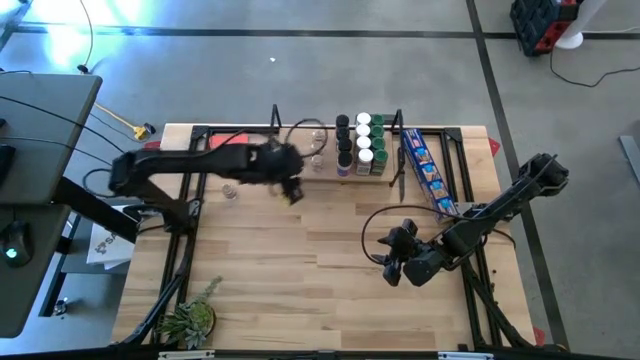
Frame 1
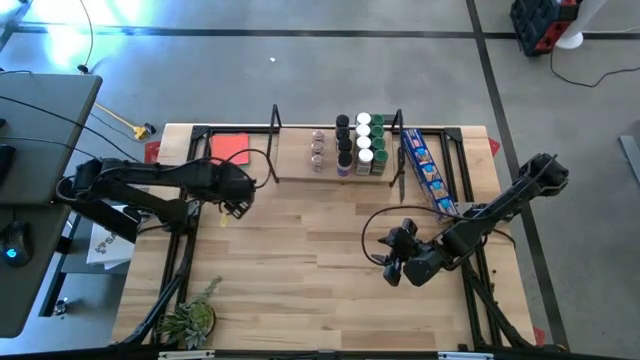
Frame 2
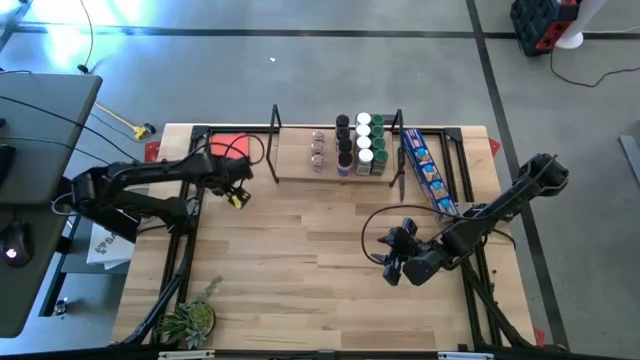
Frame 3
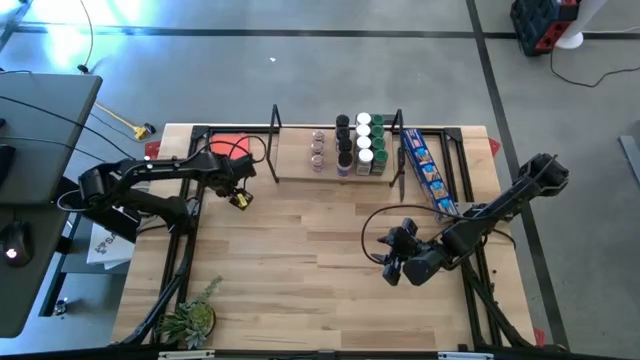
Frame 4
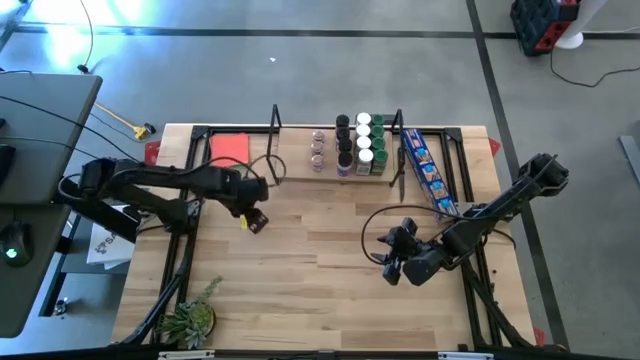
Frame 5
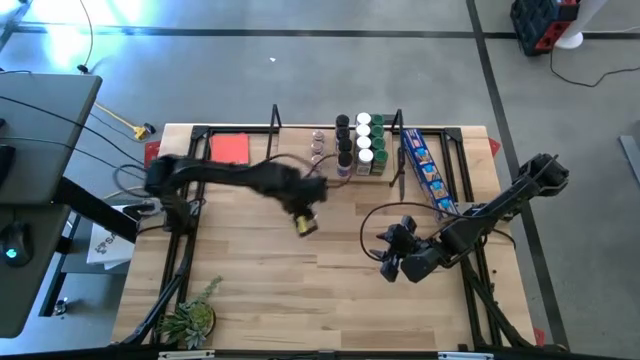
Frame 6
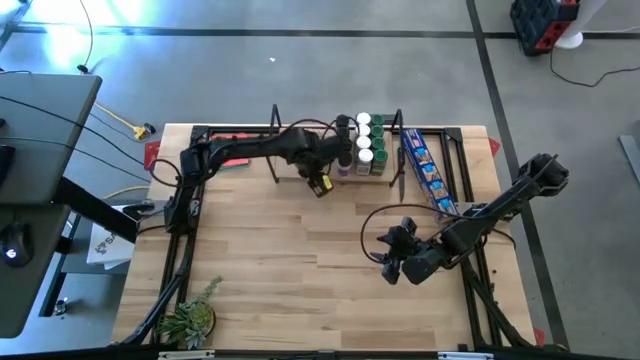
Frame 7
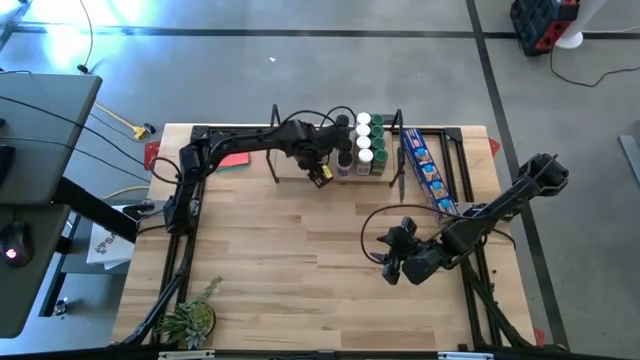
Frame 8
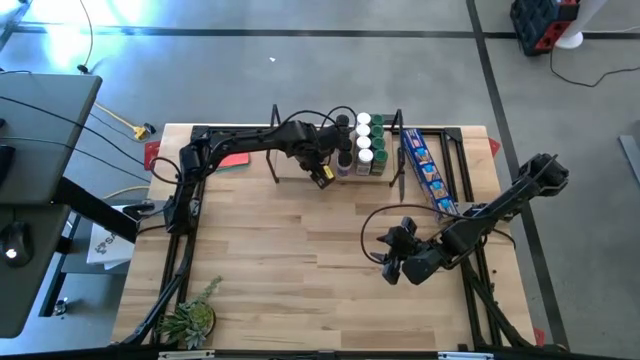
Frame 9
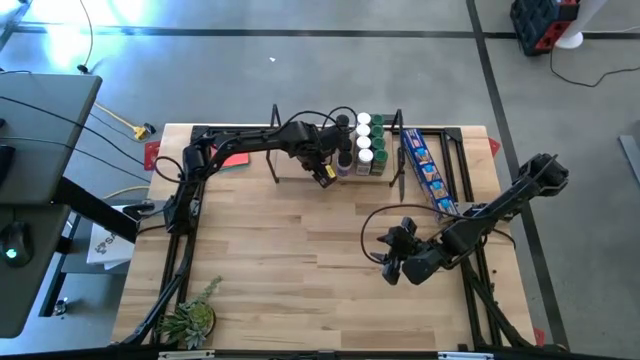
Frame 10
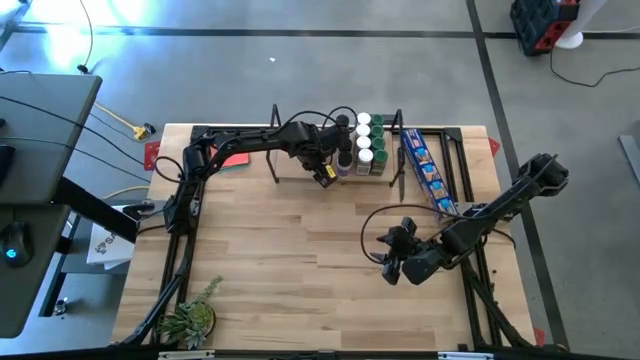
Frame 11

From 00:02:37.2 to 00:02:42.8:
Task: Shelf spices
Put the brown seasoning bottle on the shelf aligned with the other brown seasoning bottles

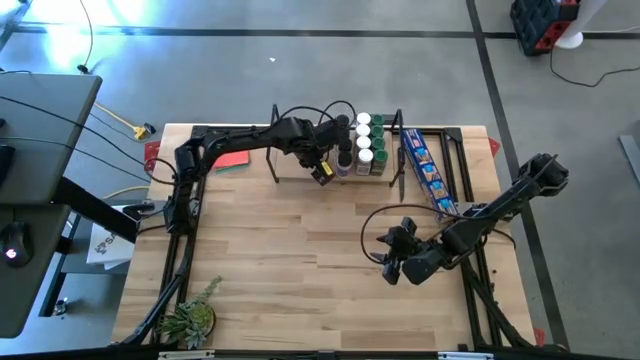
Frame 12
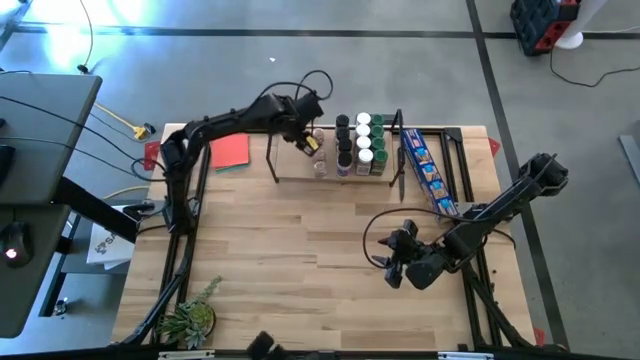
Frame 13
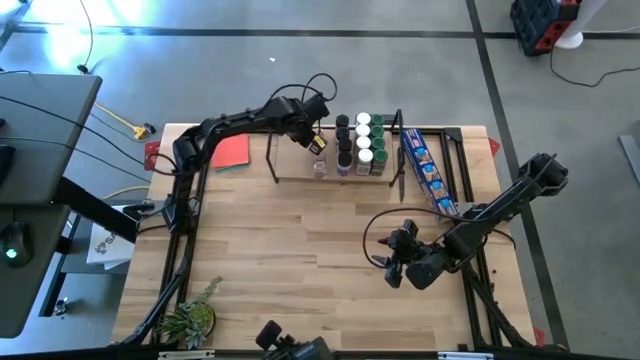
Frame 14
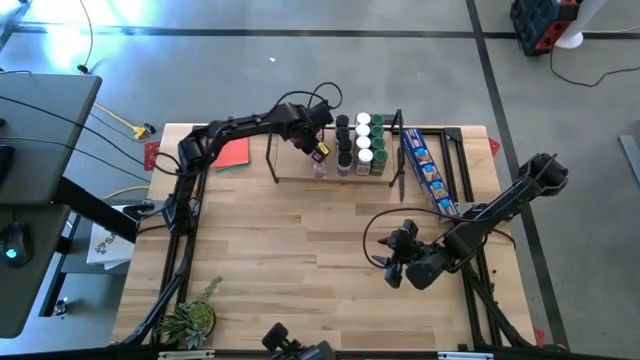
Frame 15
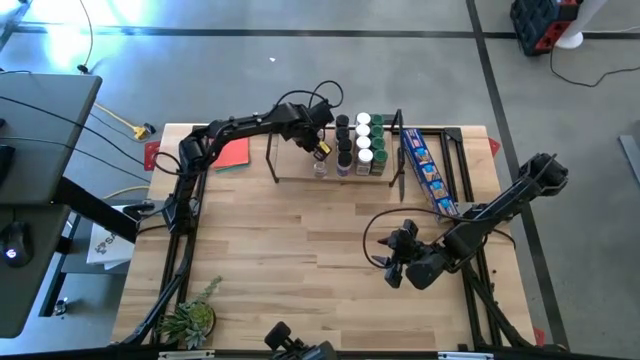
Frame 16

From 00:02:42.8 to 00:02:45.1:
Adjust the brown seasoning bottle on the shelf

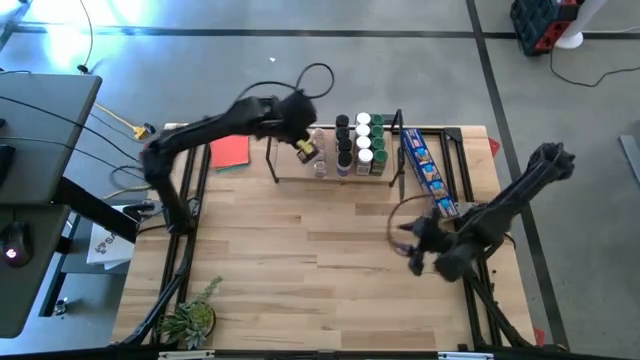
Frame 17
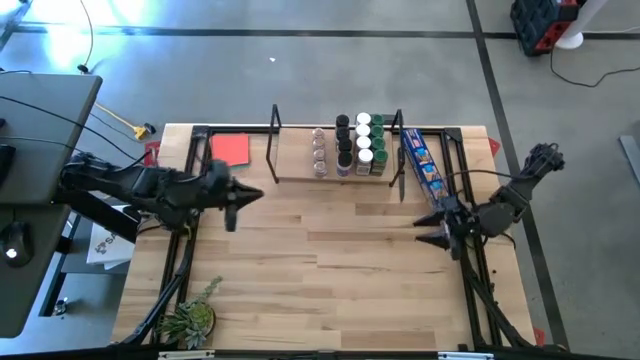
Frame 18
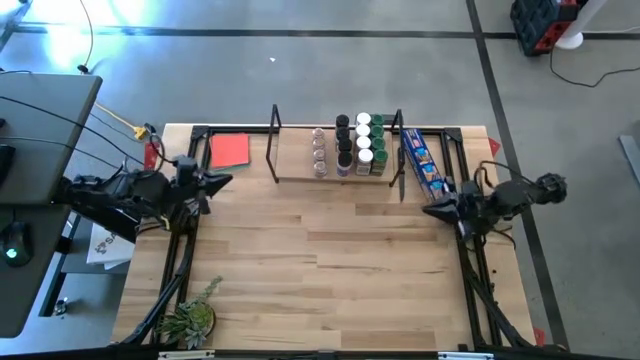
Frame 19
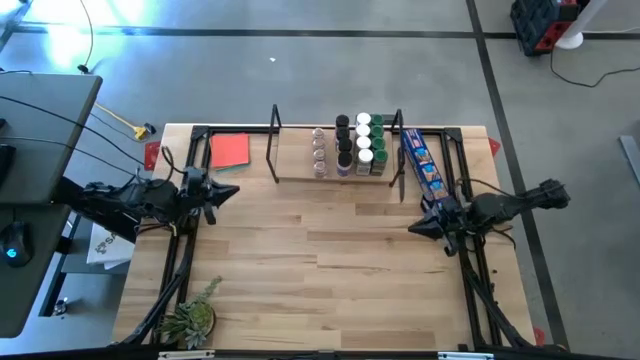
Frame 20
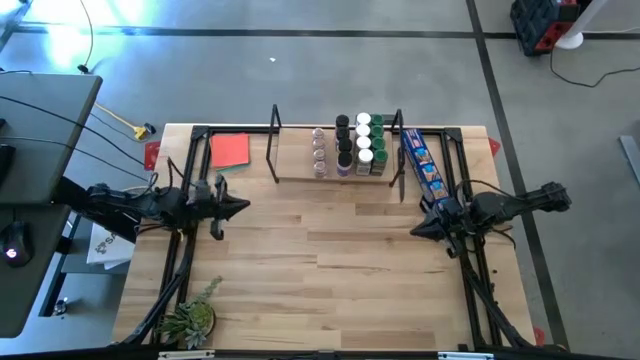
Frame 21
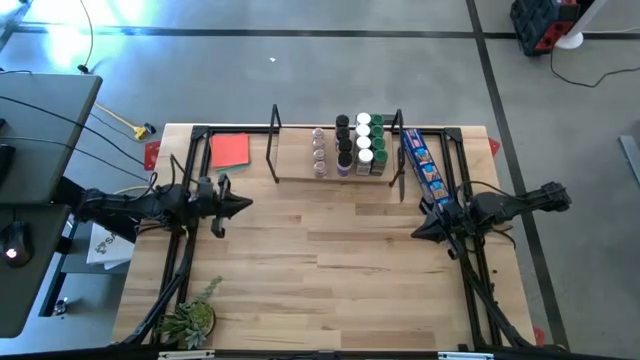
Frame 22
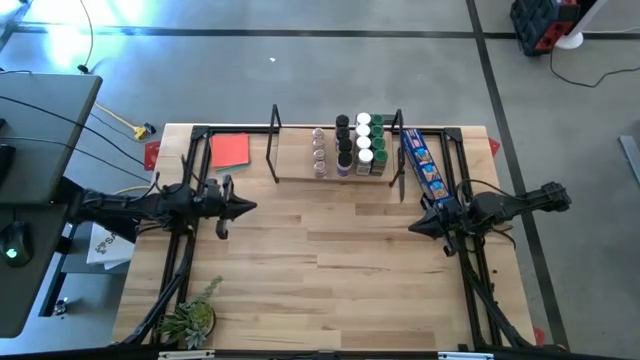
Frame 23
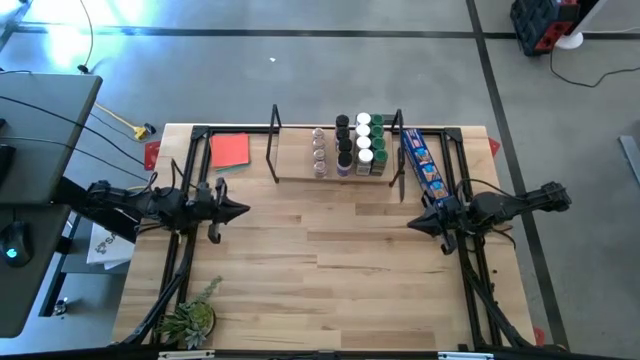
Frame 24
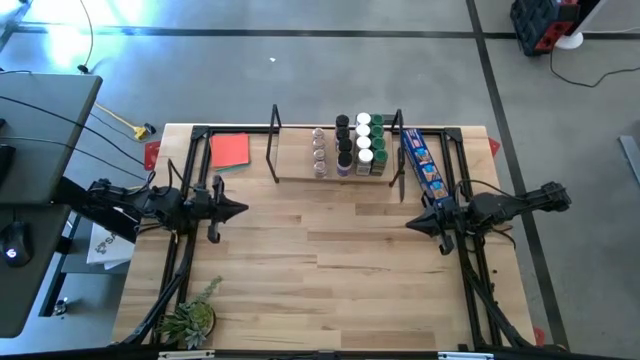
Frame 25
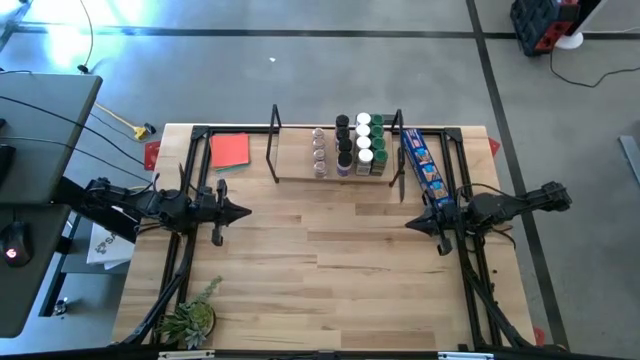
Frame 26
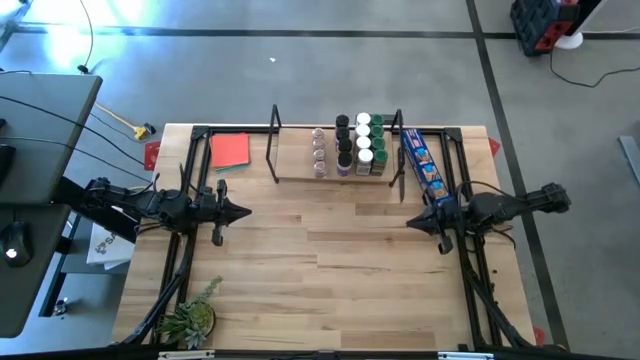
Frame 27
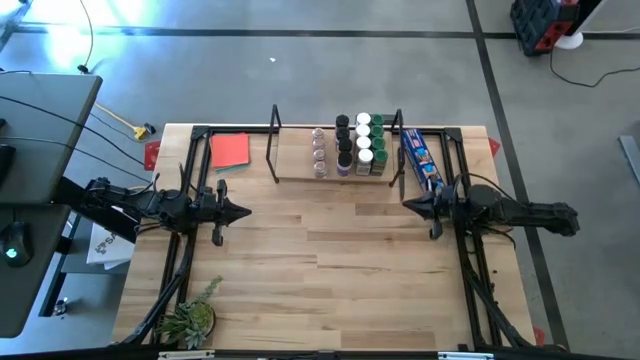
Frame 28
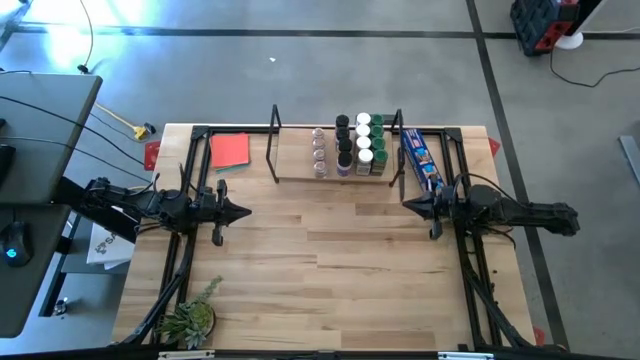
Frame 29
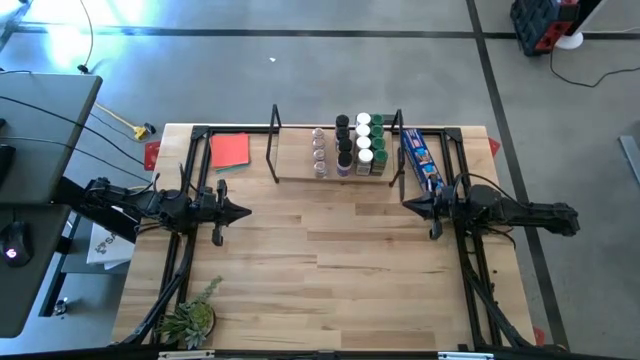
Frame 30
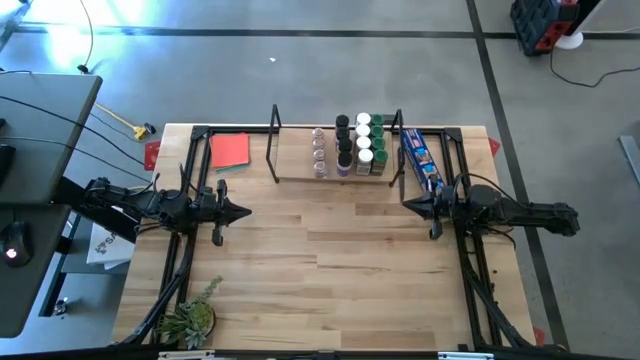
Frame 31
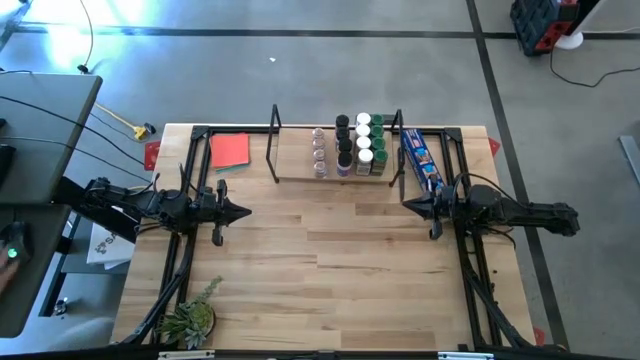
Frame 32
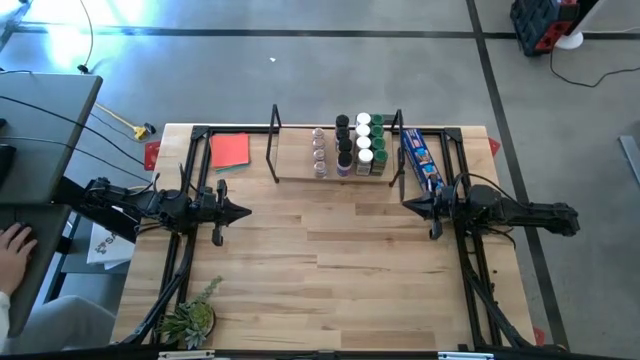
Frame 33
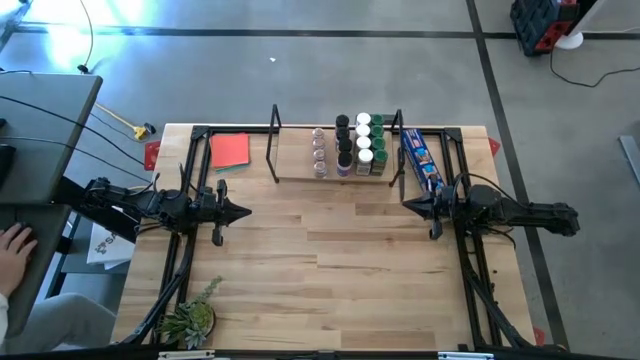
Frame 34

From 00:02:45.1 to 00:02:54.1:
Return to Home Position

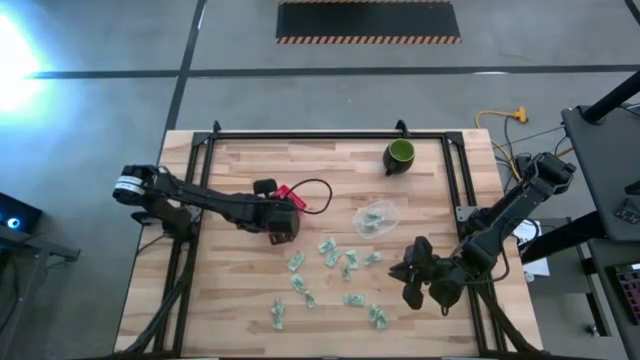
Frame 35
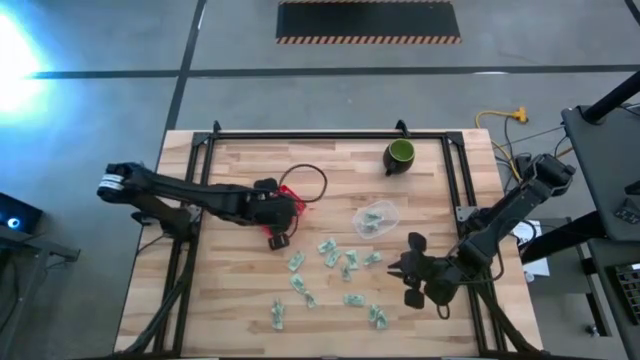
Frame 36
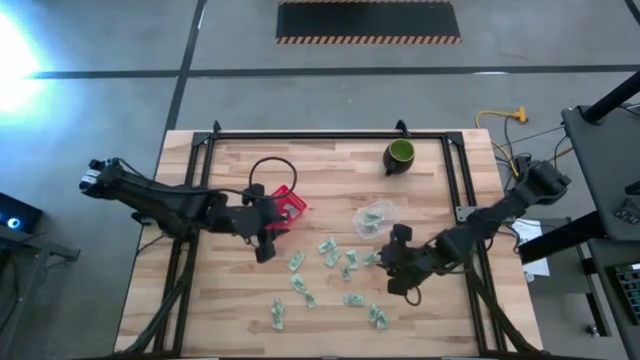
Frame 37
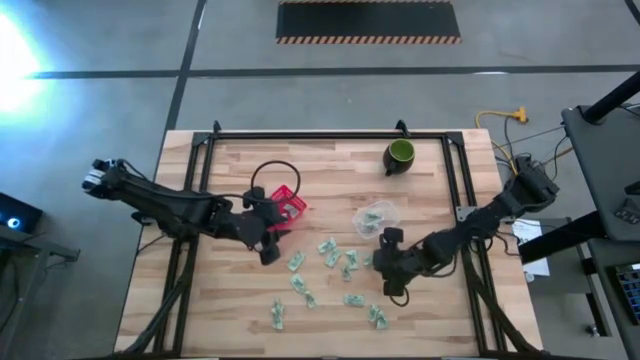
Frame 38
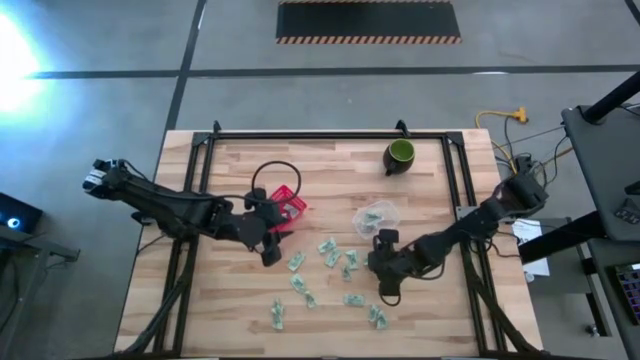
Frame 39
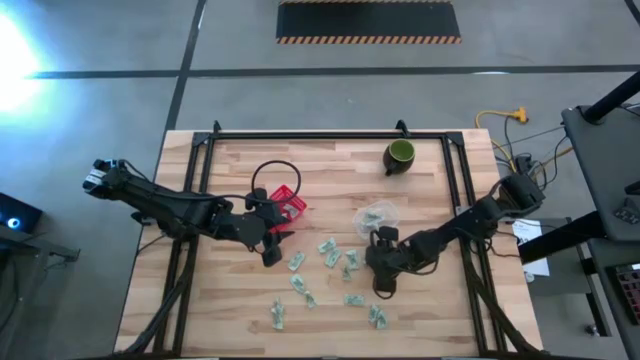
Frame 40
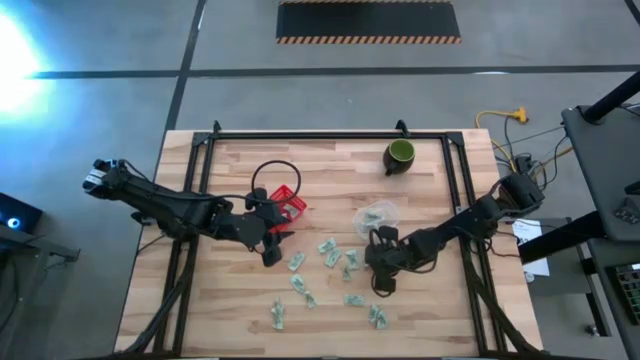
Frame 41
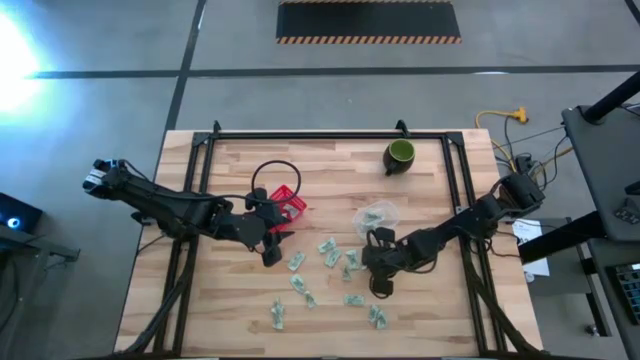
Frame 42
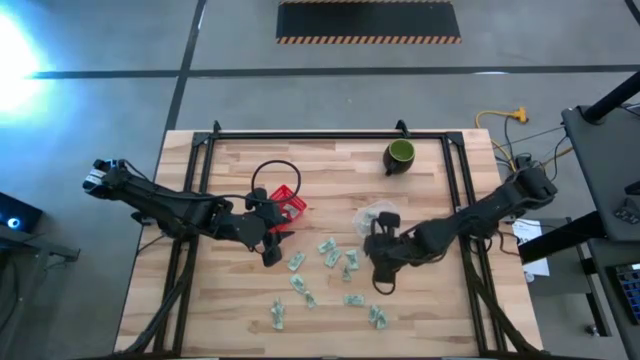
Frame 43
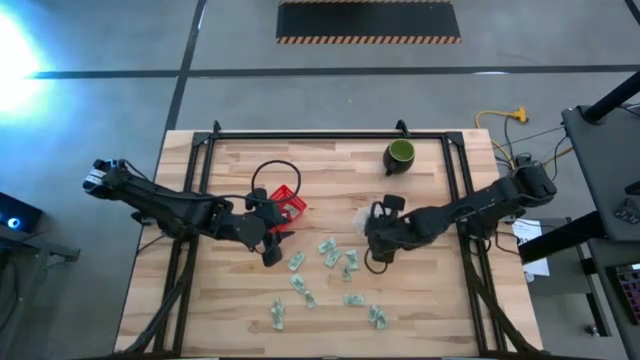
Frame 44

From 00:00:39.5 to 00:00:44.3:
Task: Pick and place items into bin
Put the stevia packet into the transparent bin
